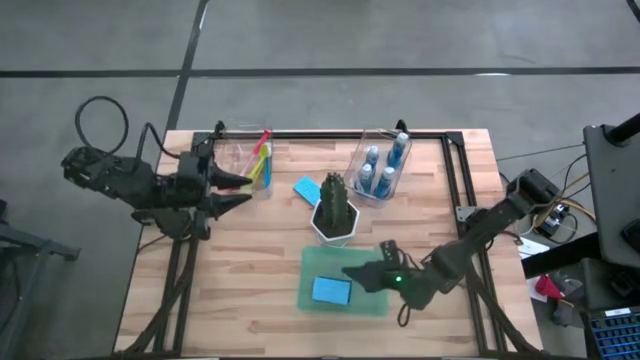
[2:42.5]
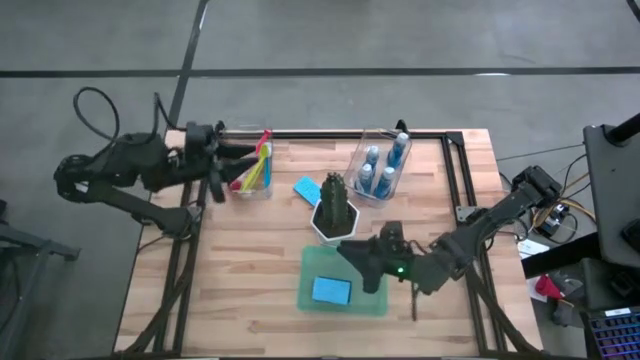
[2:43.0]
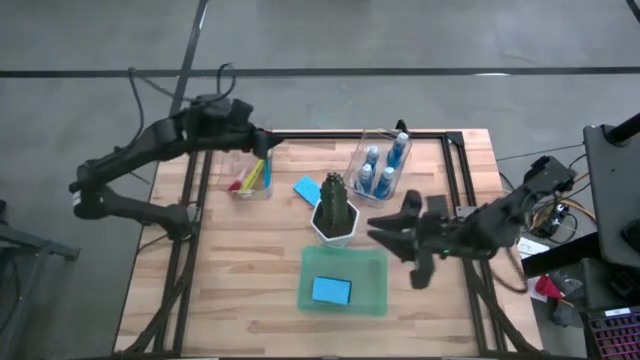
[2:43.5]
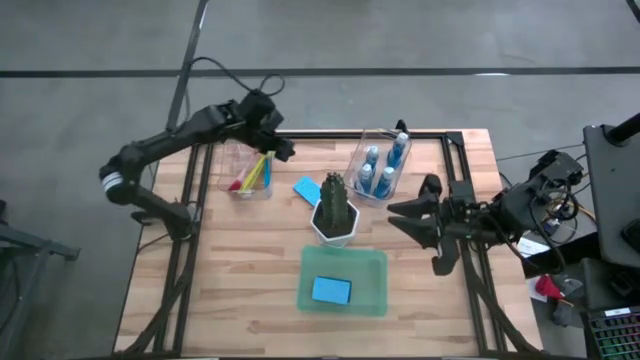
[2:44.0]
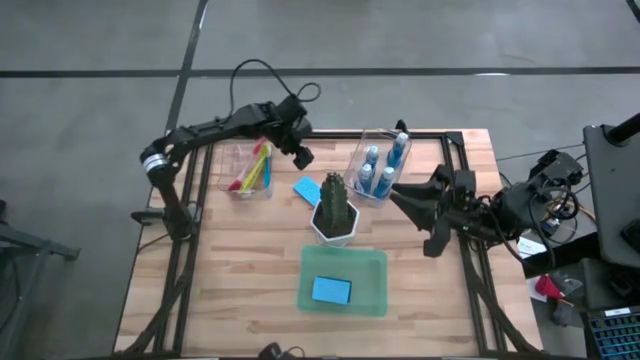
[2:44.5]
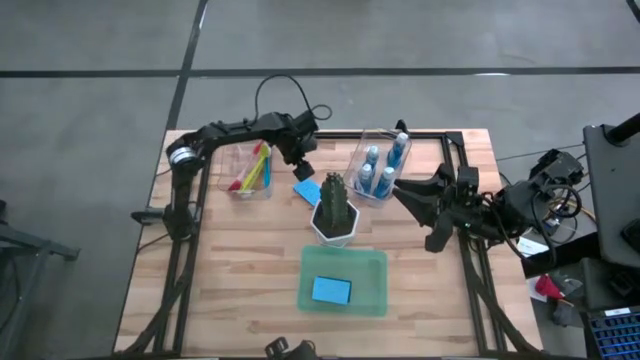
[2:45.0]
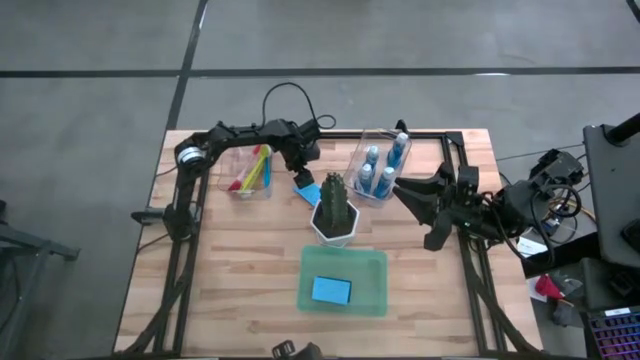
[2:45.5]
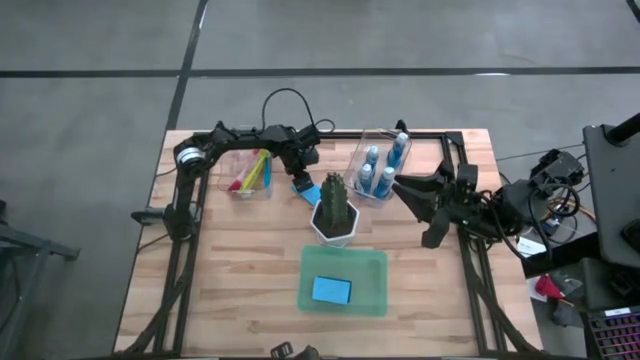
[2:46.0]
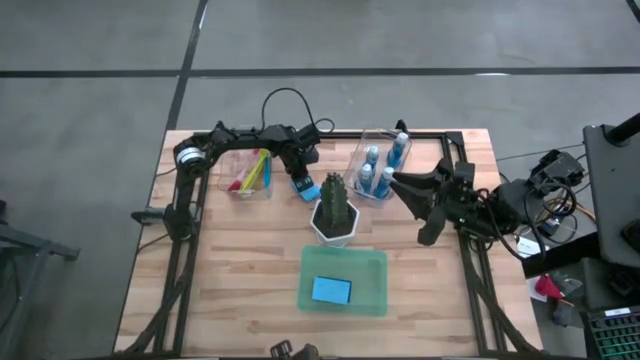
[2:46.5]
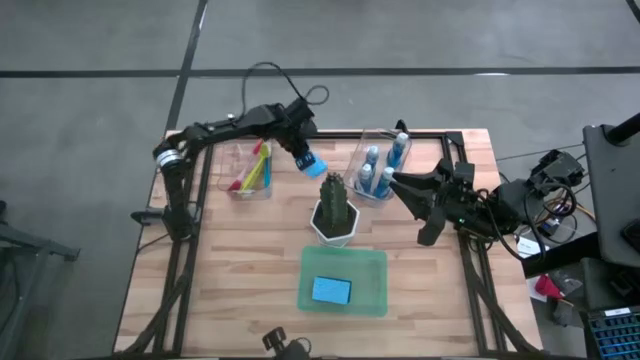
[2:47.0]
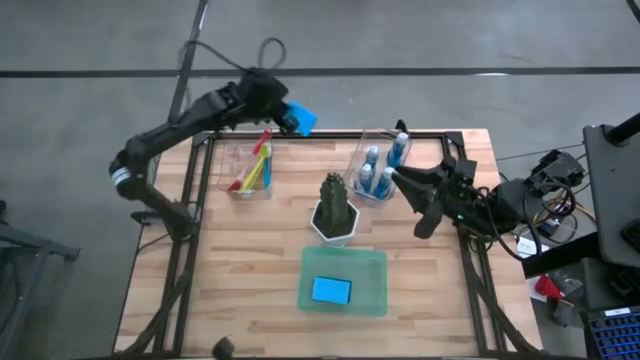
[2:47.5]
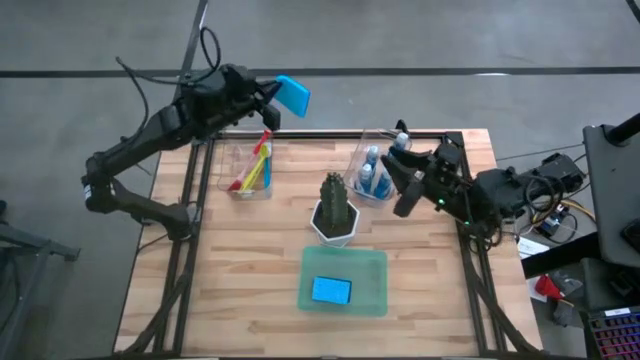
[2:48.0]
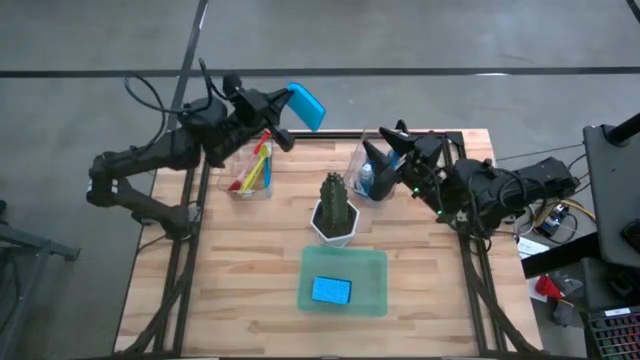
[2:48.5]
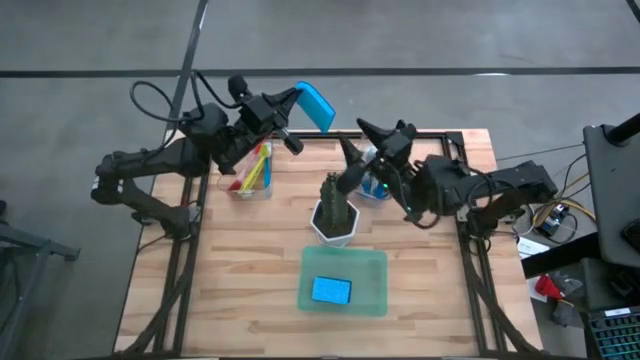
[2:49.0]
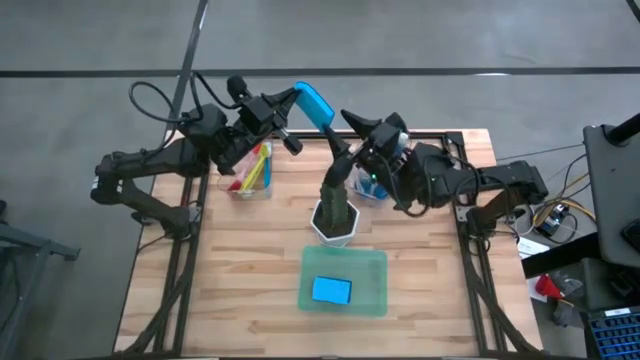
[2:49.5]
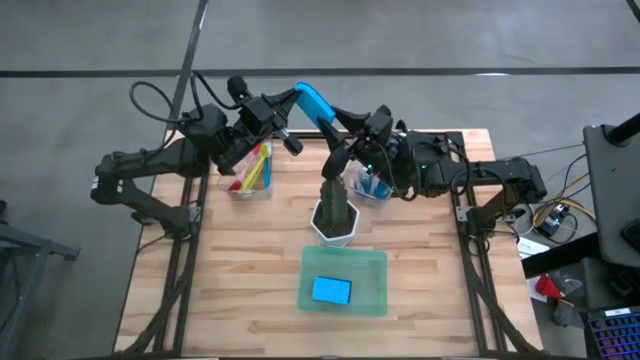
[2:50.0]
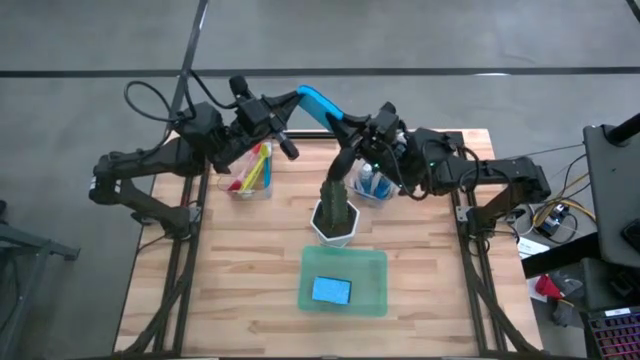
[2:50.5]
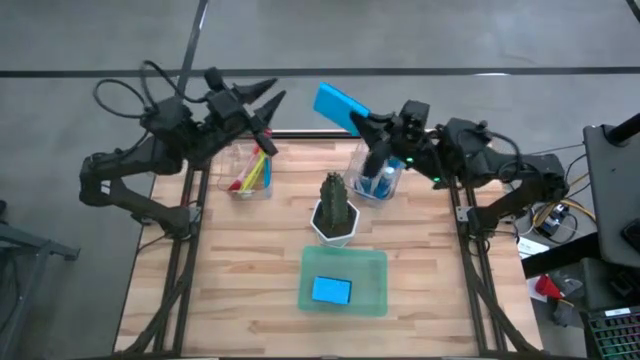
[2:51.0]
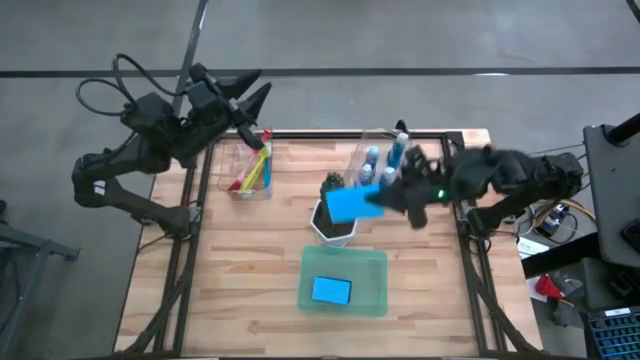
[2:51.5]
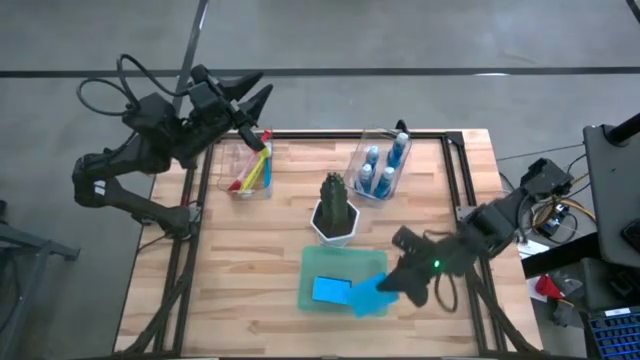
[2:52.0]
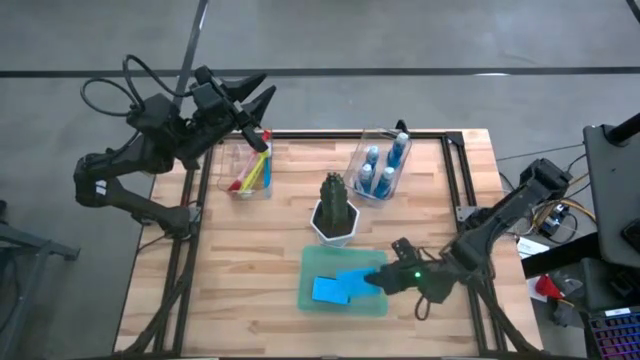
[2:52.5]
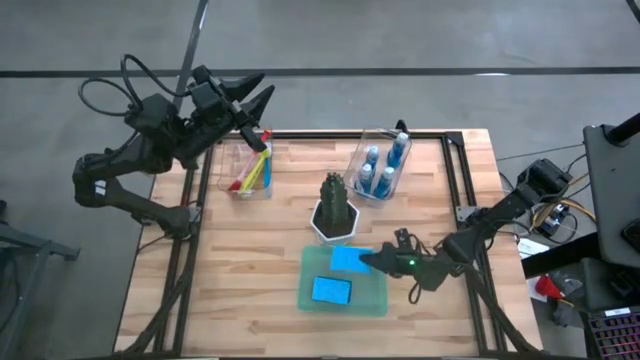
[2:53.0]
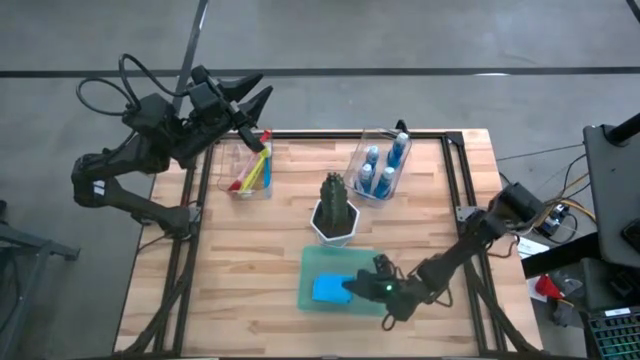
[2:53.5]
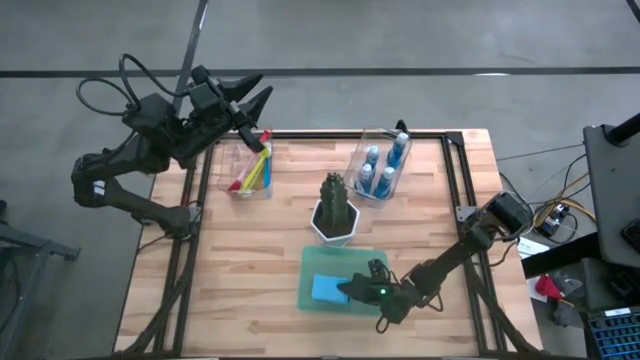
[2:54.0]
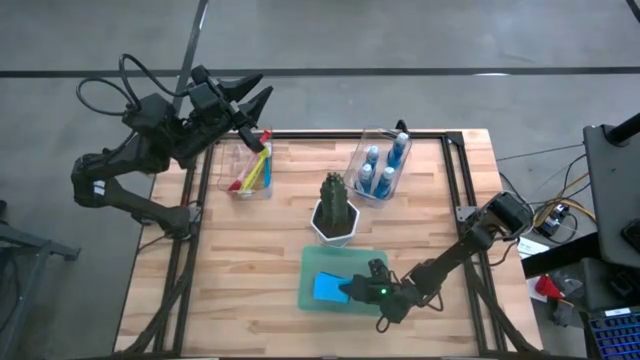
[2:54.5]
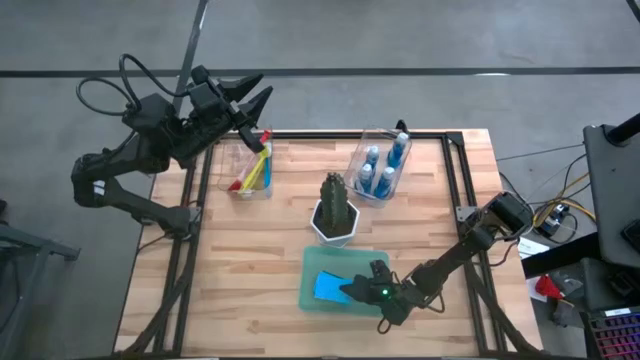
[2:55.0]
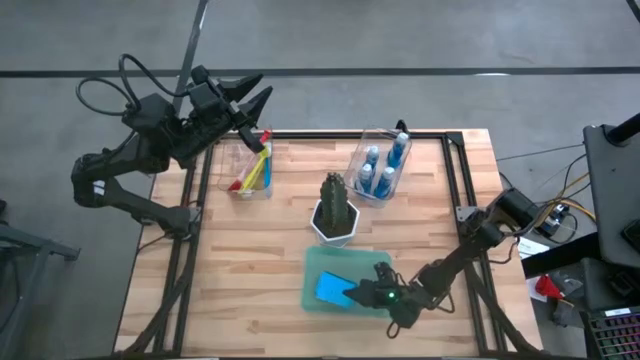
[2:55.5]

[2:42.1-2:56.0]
Task: Pick & Place Kitchen Sink Supplies
Stack the sponge on top of the sponge in the green bin

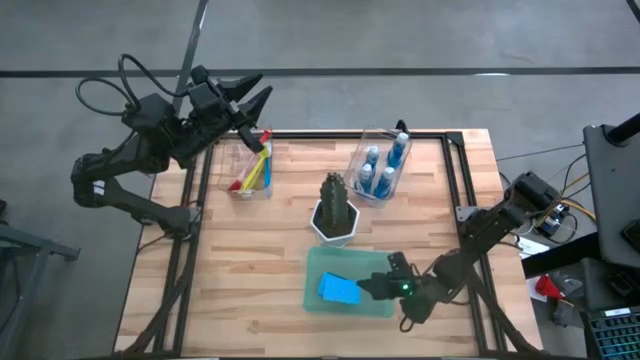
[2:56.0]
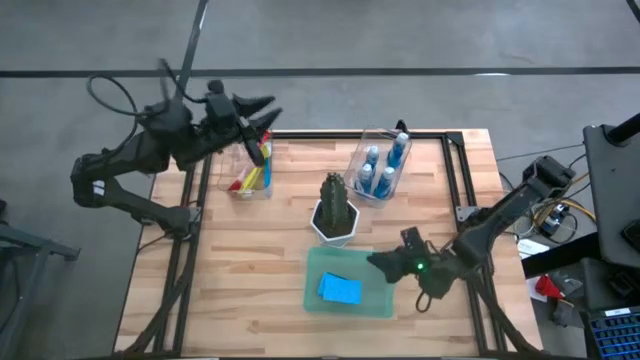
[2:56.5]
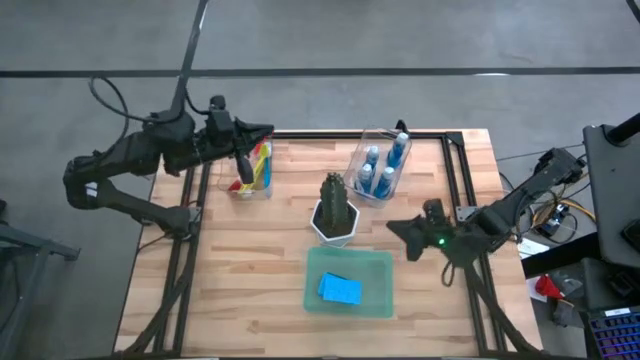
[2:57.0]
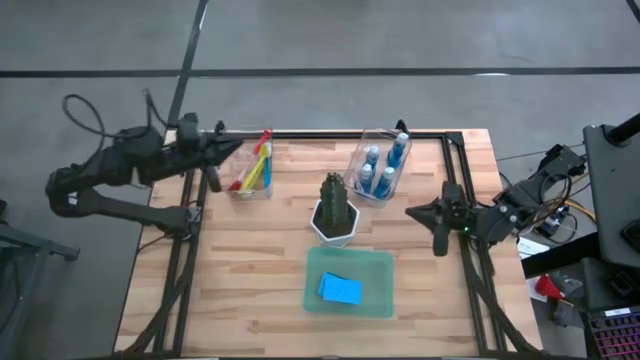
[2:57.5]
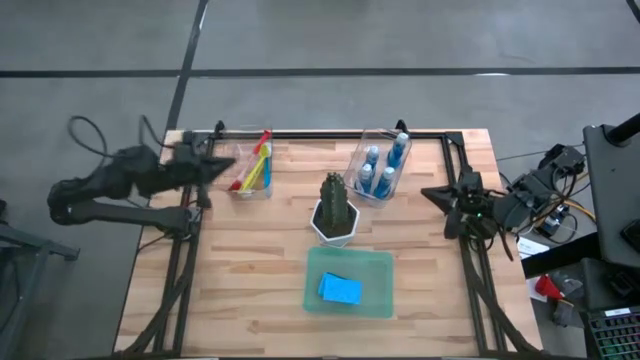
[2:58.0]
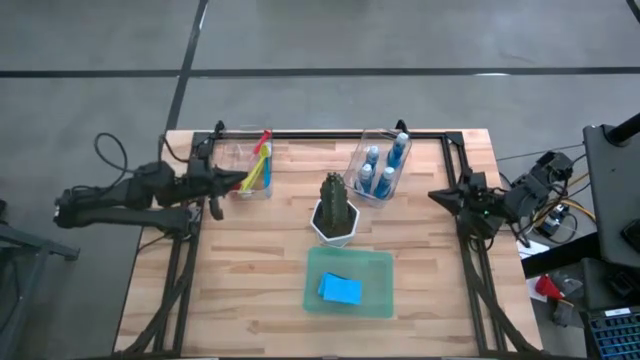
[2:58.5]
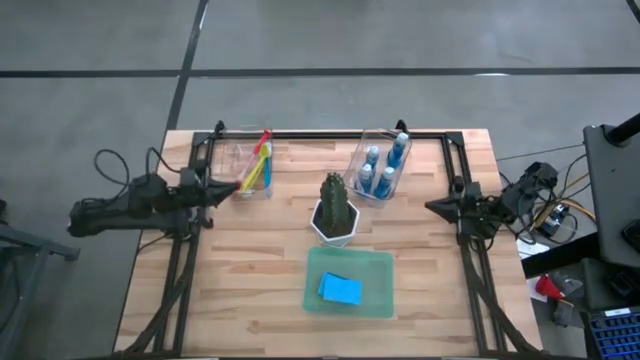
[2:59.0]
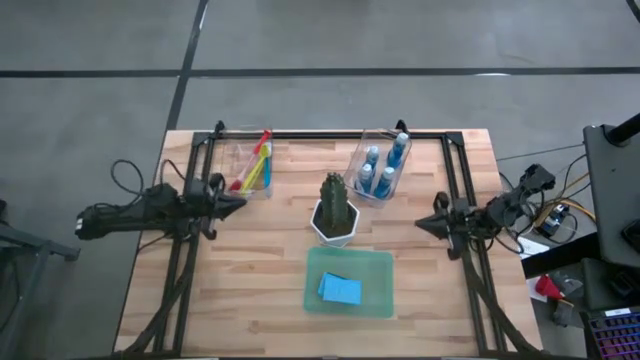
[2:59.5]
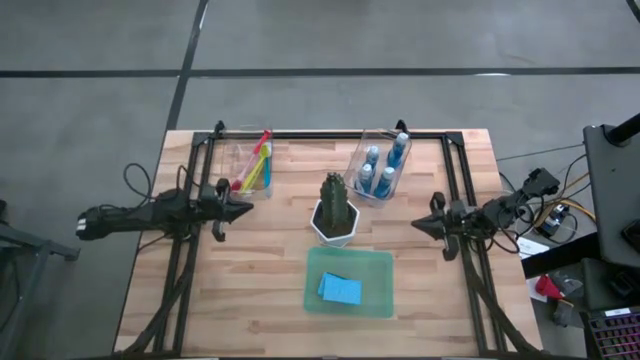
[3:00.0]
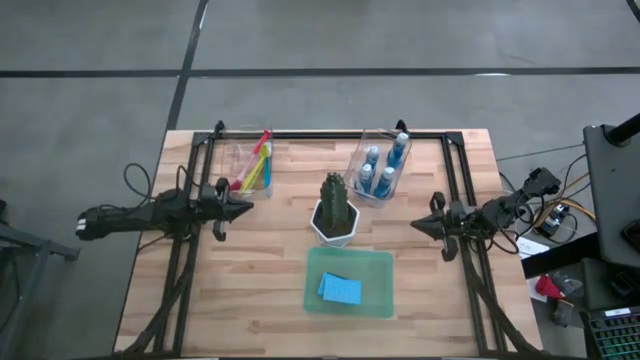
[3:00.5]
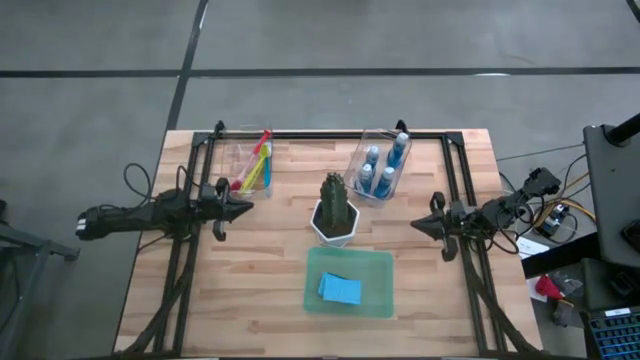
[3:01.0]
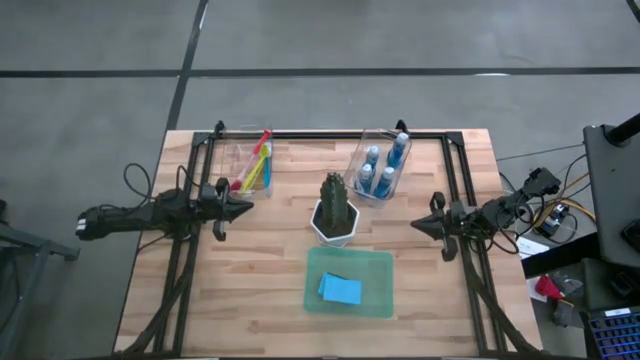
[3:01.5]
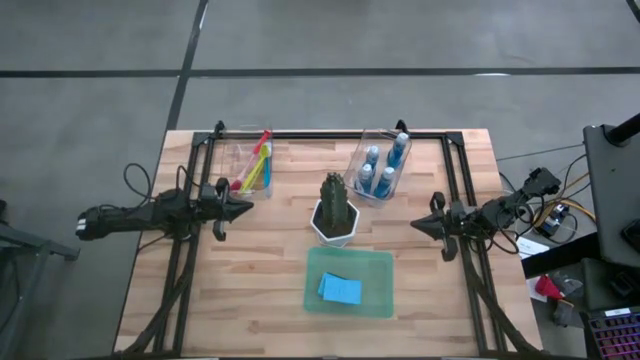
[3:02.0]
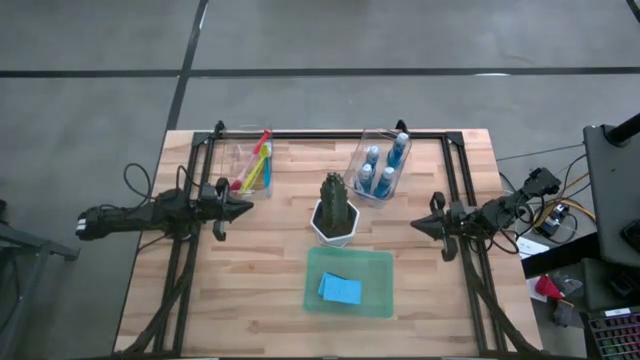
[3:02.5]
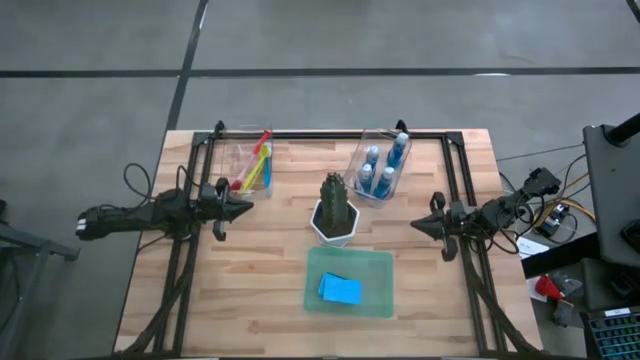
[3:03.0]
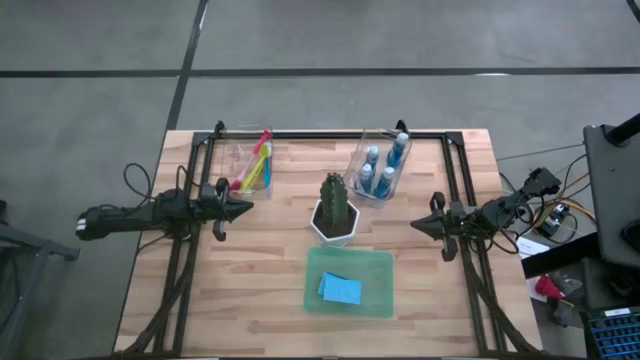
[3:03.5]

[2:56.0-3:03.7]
Return to Home Position

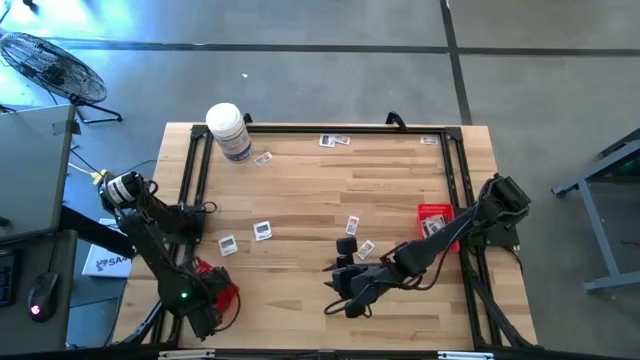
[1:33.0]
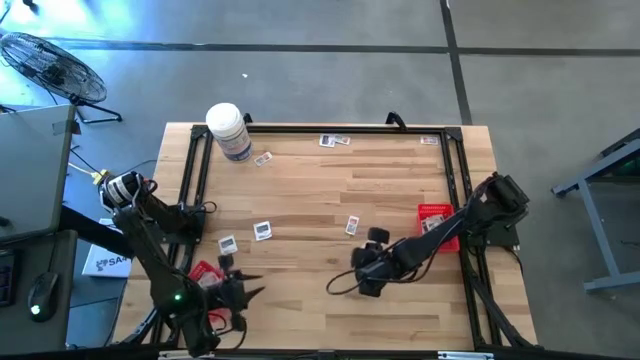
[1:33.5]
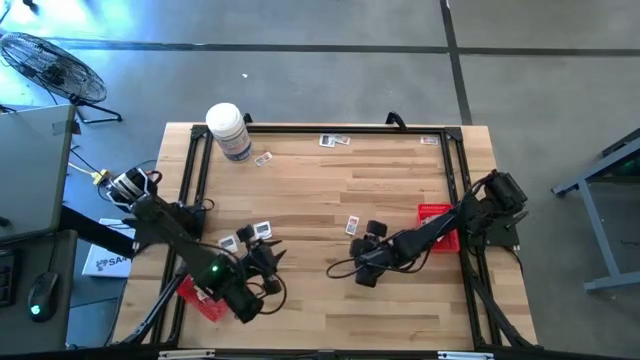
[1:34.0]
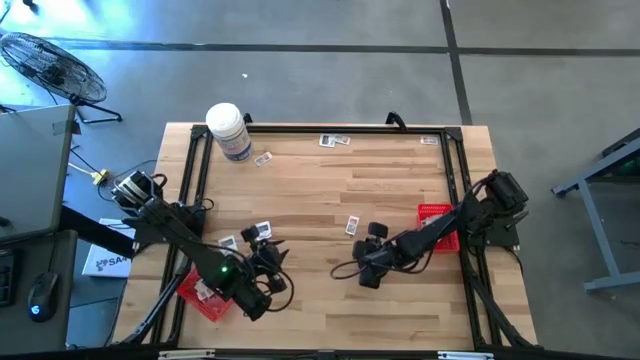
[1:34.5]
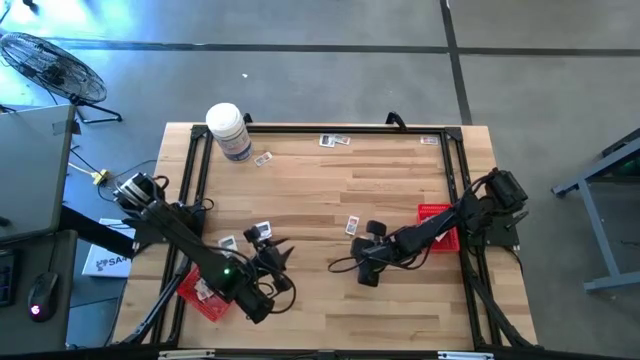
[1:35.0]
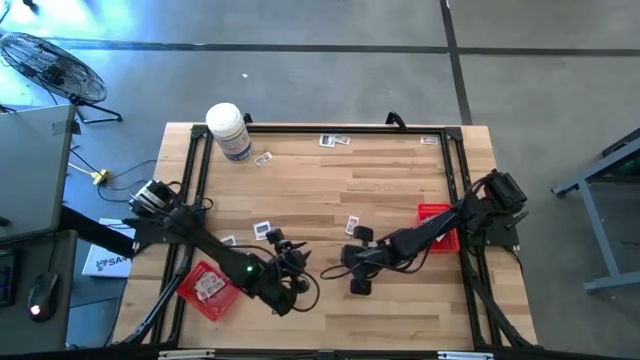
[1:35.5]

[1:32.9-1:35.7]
Task: Pick & Place First Aid Supplies
Put the ointment pack into the left red bin
